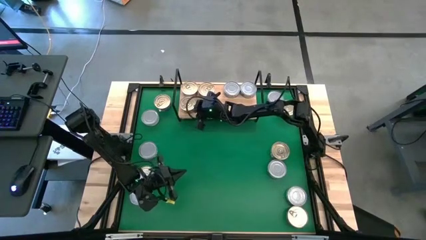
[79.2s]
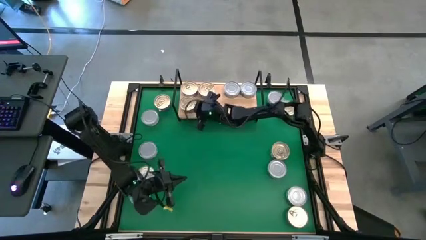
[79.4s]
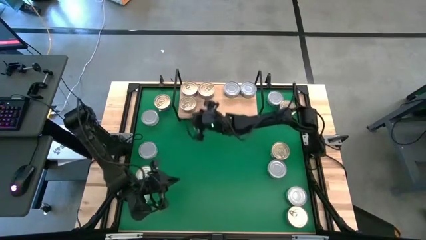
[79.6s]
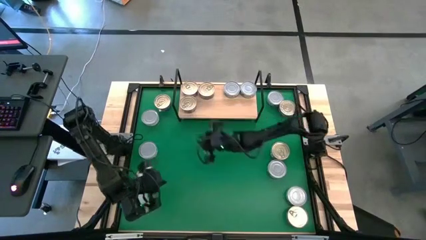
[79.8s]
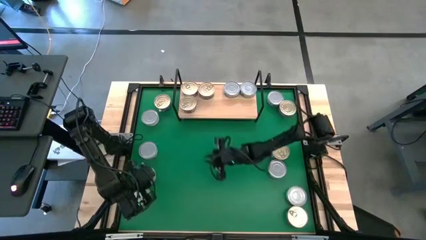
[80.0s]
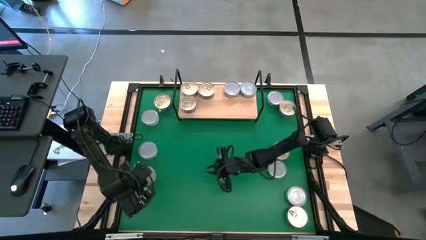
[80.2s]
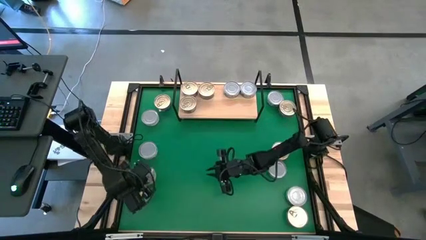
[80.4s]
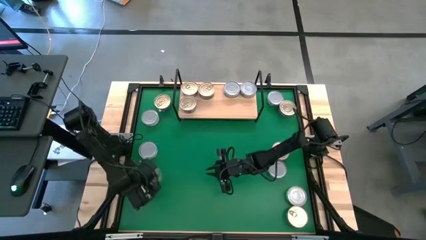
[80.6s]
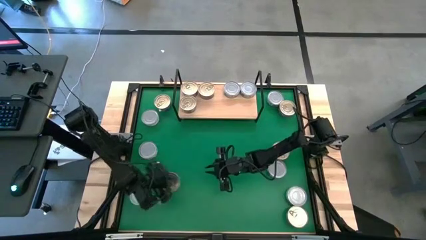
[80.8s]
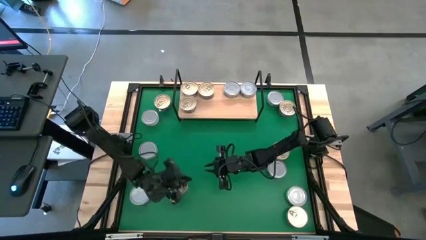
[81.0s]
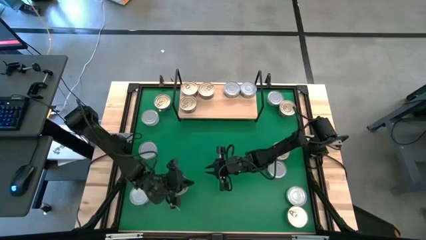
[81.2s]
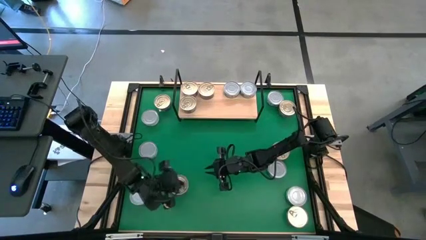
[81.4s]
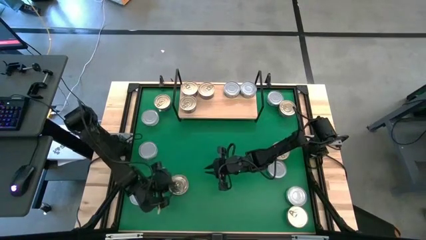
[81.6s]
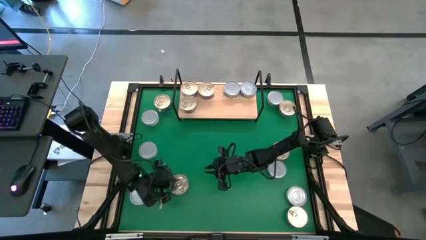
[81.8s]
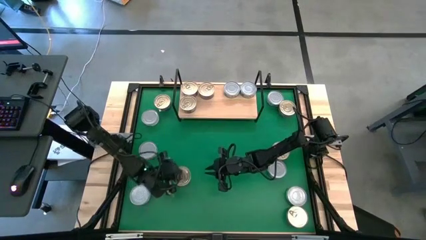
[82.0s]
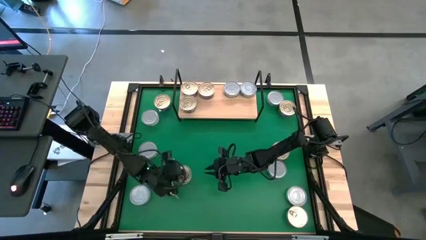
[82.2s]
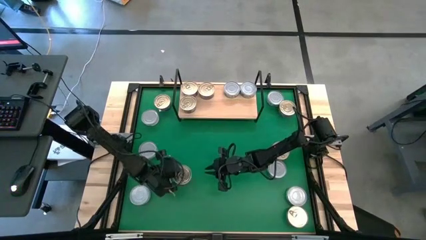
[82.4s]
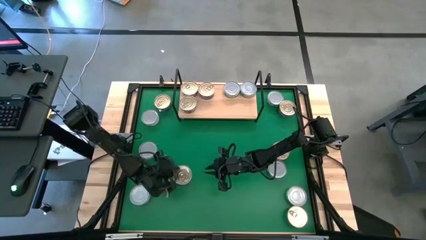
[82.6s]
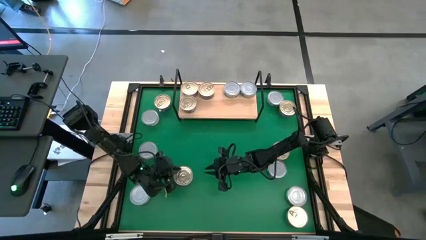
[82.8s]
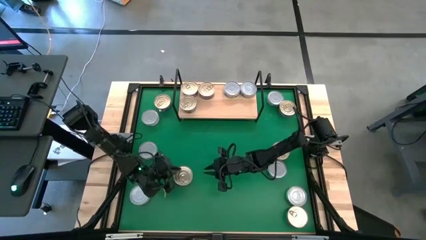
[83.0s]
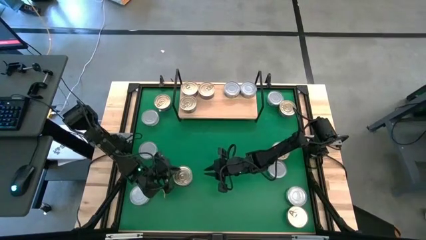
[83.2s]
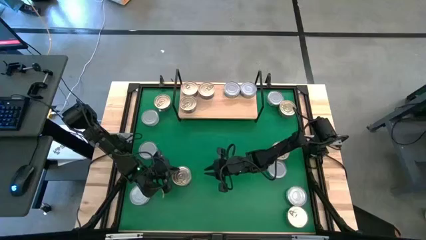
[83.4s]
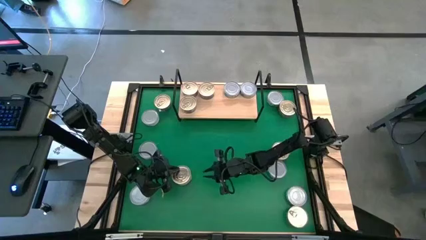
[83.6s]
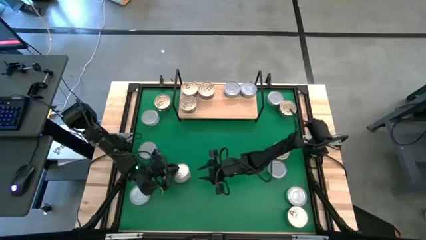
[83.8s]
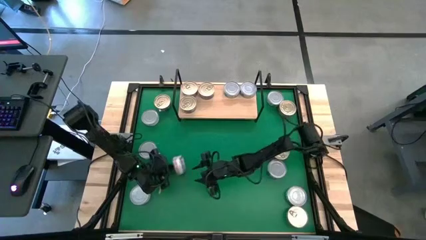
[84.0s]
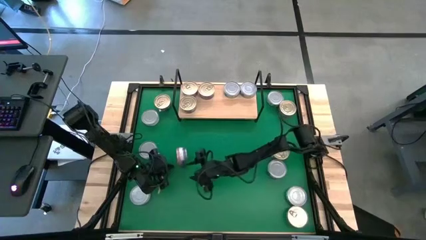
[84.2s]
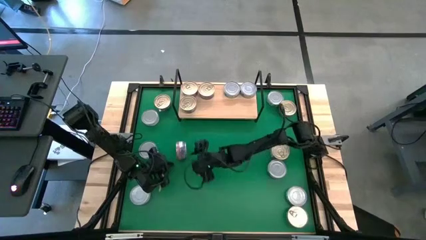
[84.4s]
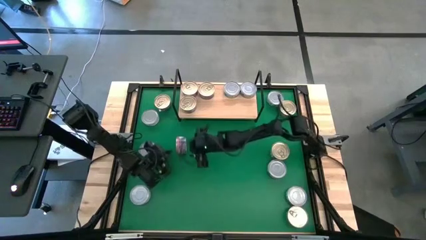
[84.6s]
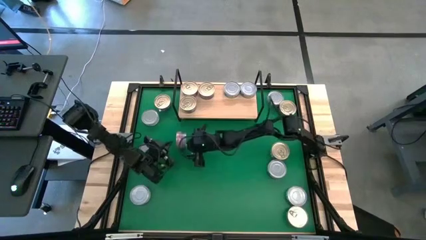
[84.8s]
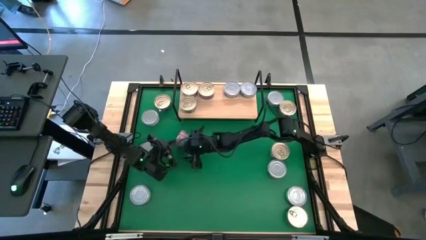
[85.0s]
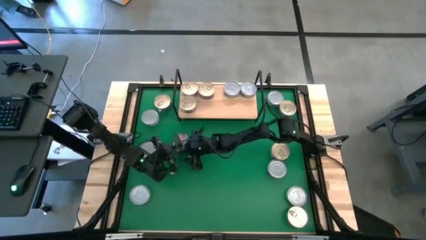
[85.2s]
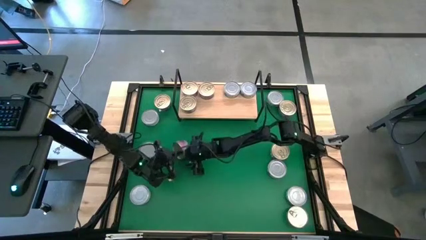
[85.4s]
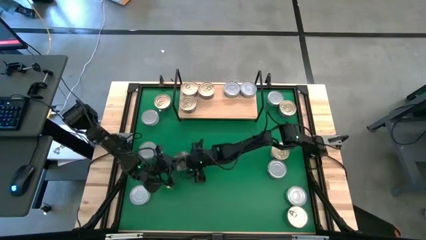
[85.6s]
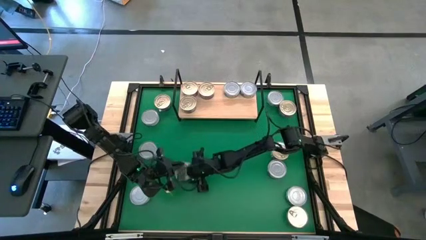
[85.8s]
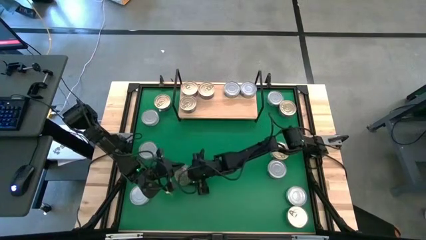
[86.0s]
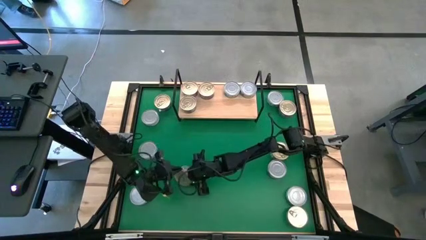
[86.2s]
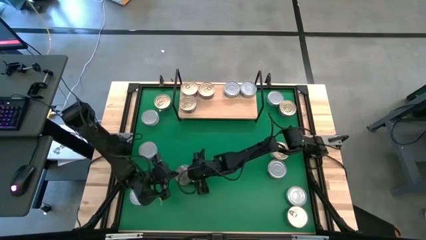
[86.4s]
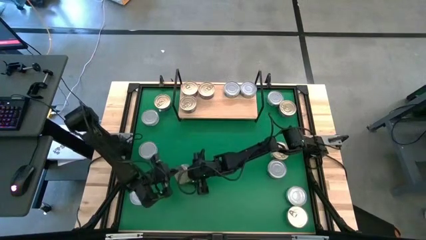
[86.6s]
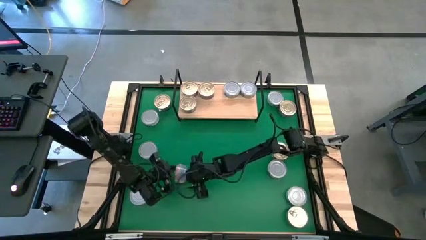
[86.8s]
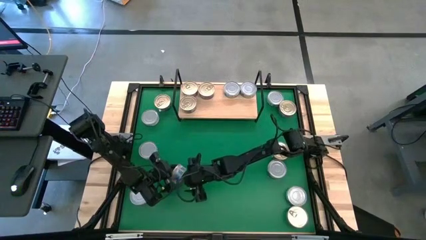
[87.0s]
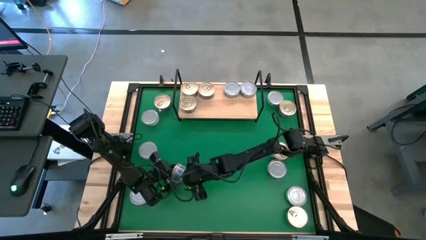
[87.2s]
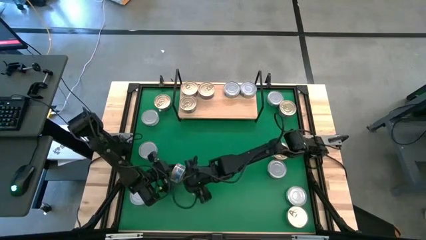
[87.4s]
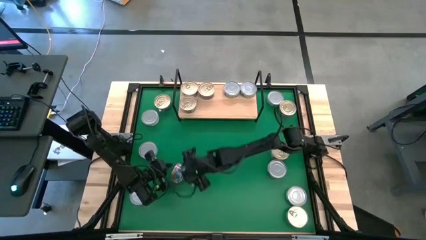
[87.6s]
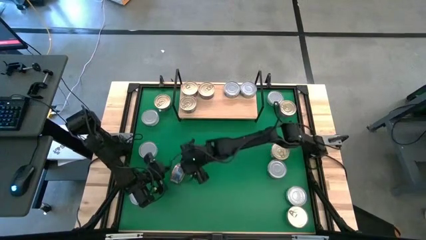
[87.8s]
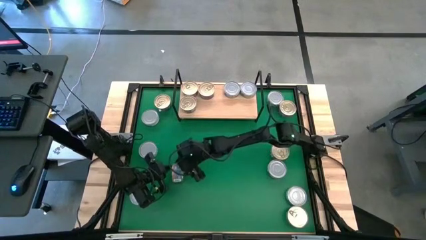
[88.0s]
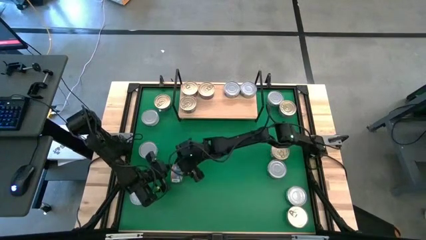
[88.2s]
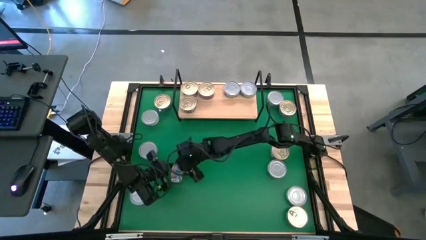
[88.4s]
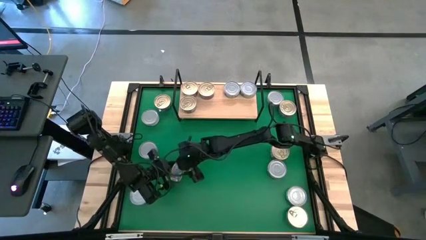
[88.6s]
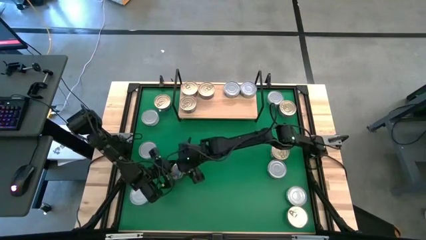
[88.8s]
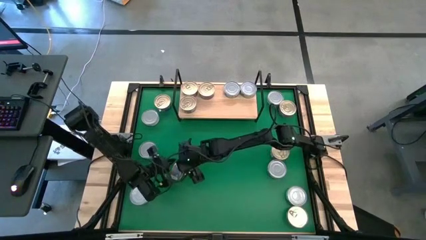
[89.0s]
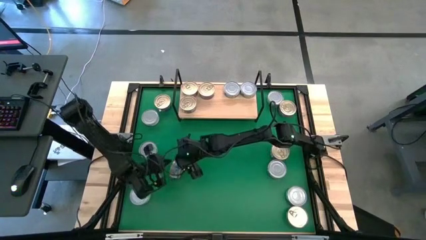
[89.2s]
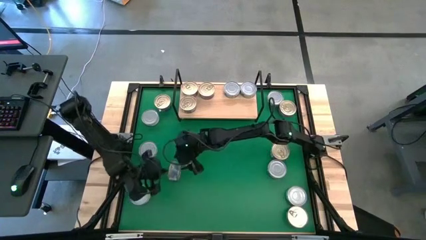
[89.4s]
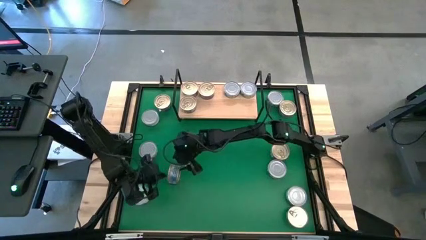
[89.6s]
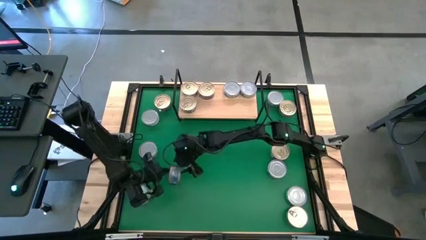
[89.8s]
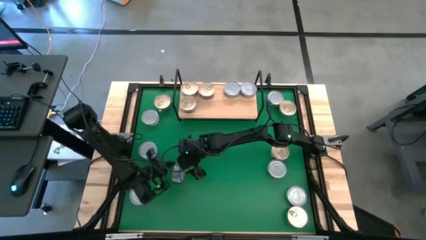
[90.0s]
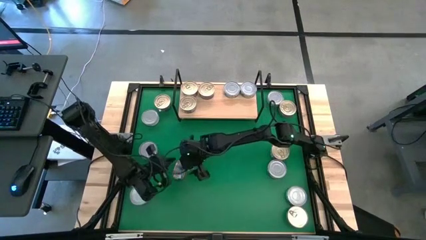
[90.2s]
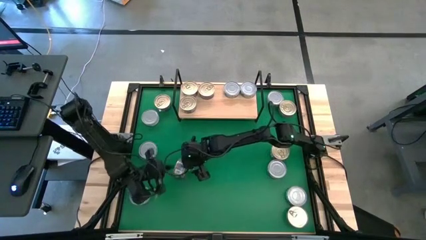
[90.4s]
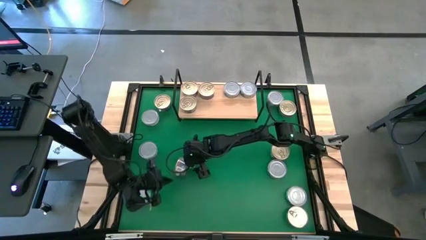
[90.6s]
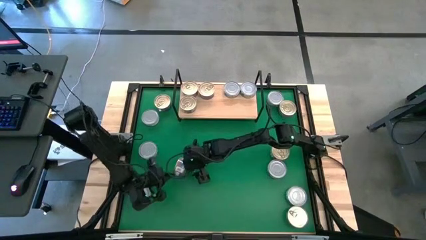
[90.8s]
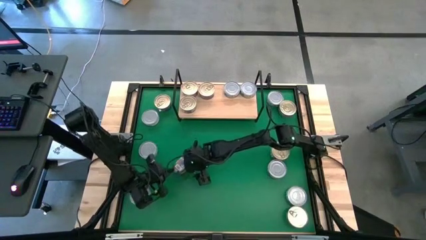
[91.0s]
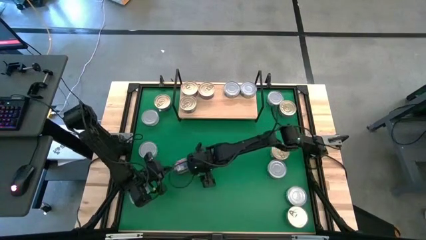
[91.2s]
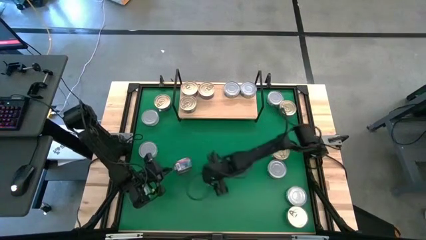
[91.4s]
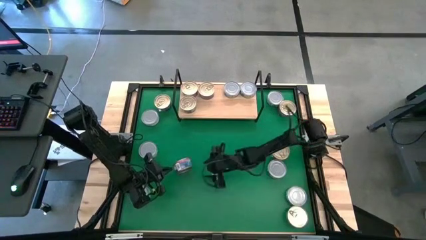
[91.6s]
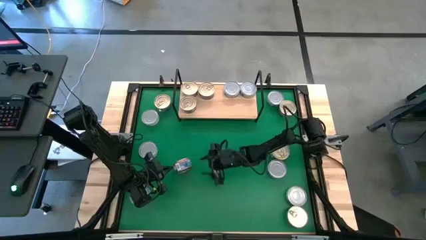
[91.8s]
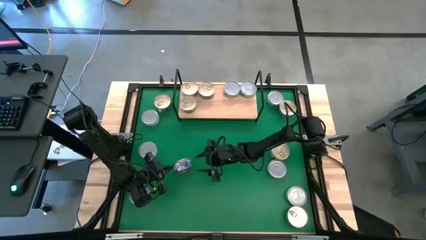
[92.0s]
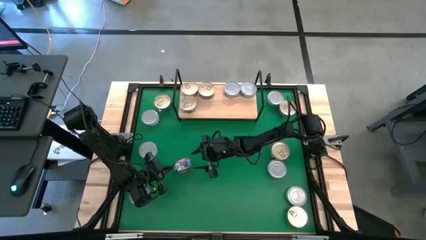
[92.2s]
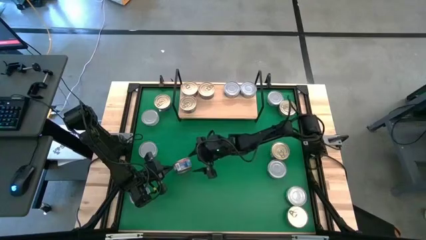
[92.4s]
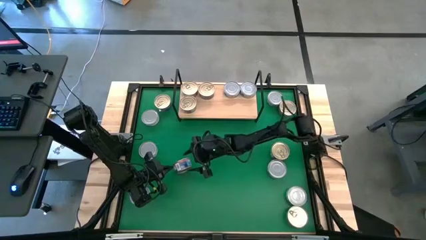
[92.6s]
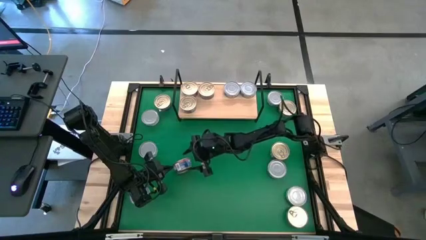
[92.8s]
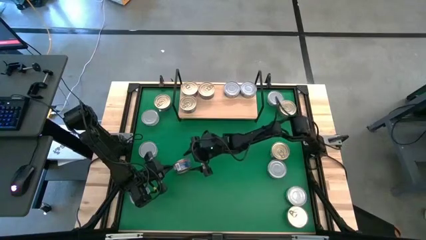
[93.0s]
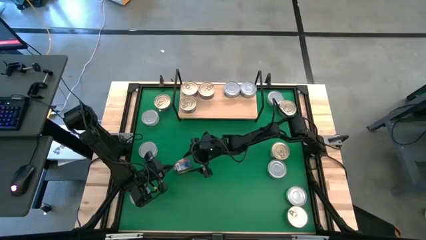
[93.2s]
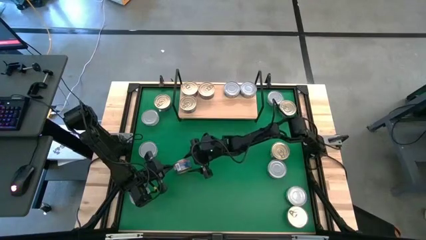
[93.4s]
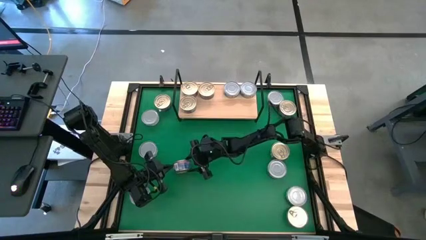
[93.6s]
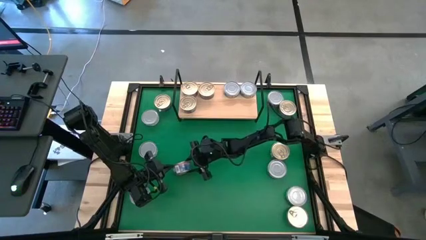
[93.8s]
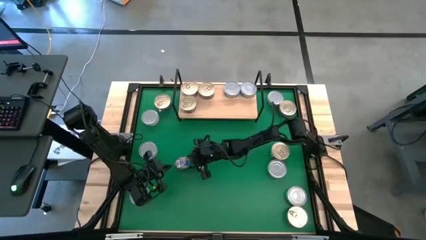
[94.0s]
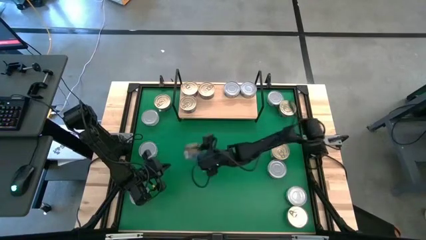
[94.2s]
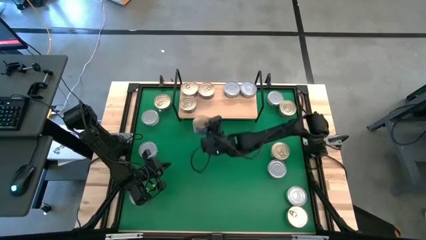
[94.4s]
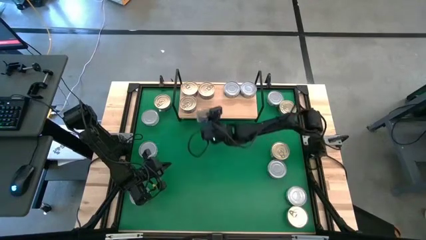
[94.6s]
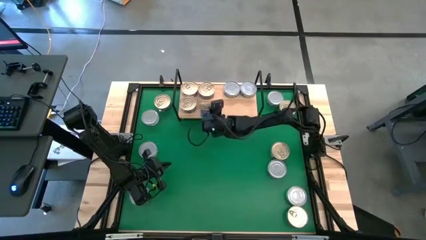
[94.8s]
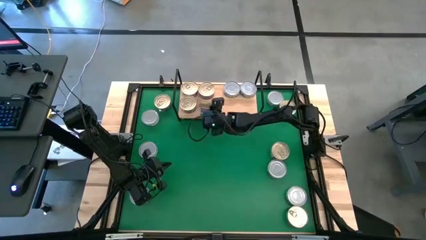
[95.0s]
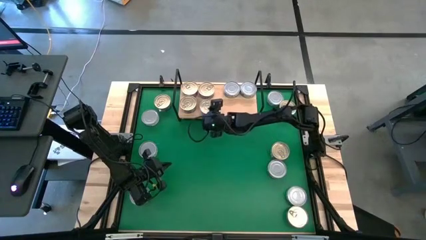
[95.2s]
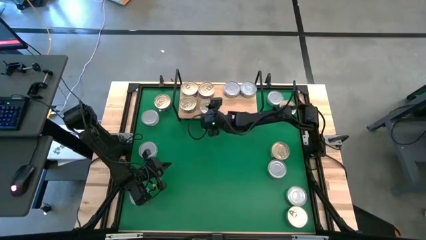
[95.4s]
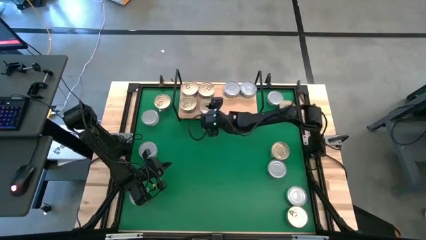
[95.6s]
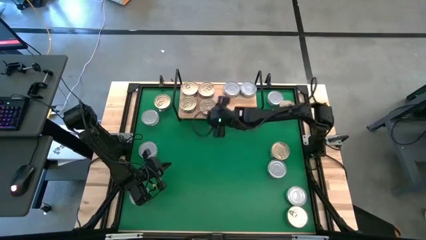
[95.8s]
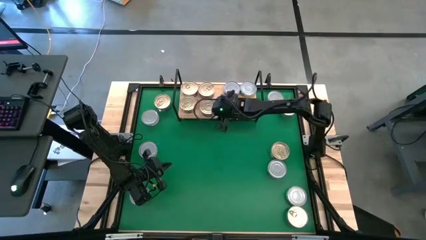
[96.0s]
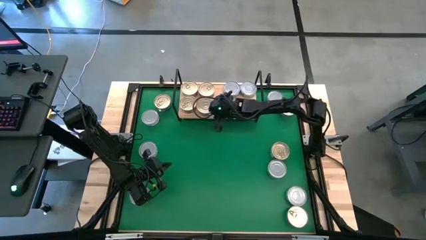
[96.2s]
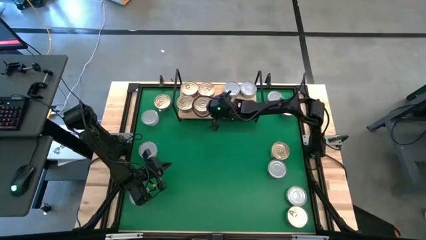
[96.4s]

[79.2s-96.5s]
Task: Stack canned seafood by type on shelf
Put the blue pink tuna can on the shelf
